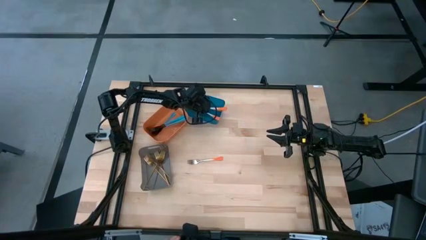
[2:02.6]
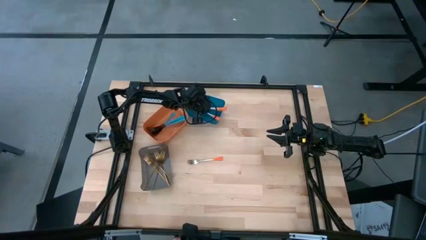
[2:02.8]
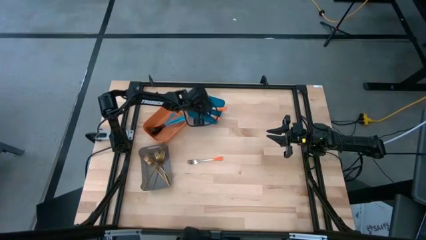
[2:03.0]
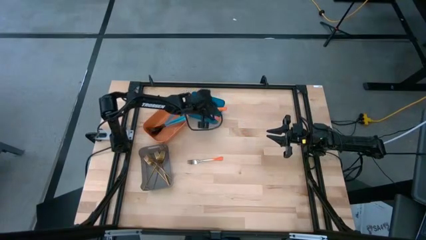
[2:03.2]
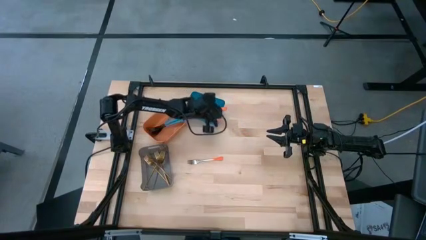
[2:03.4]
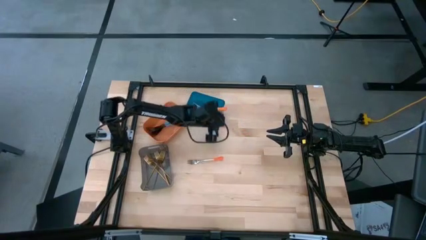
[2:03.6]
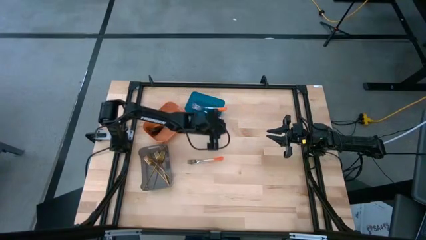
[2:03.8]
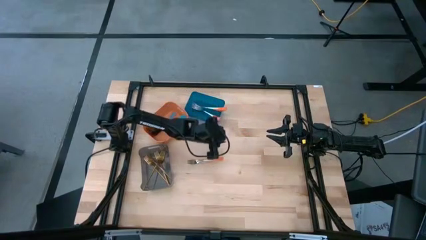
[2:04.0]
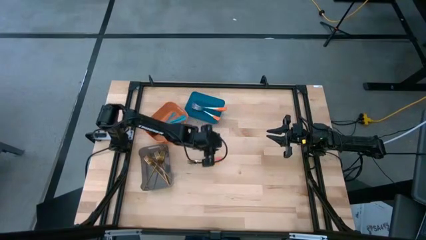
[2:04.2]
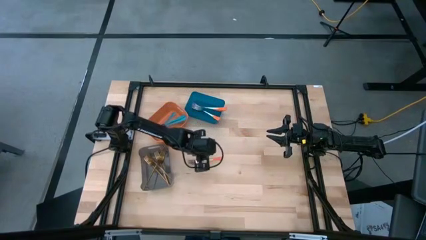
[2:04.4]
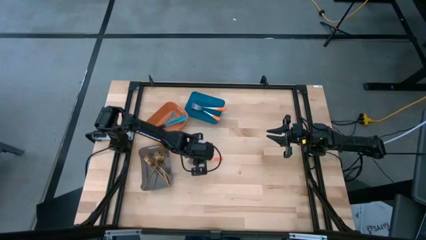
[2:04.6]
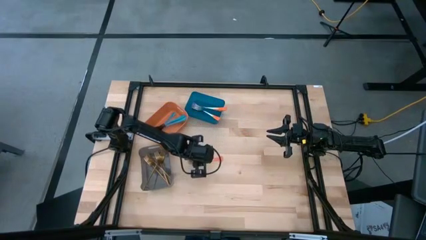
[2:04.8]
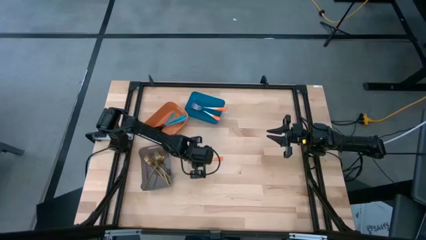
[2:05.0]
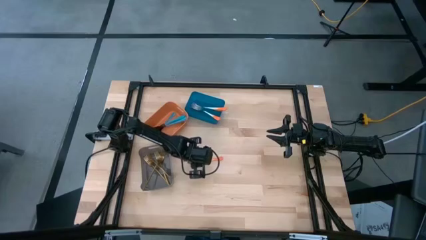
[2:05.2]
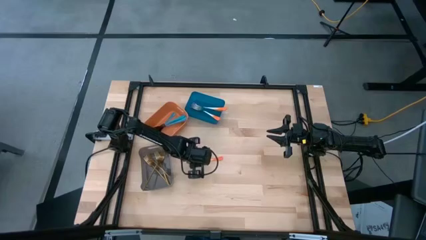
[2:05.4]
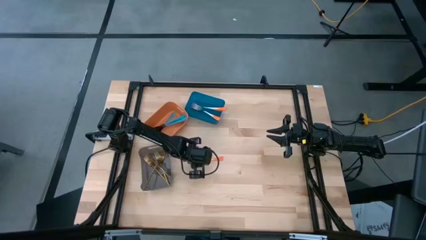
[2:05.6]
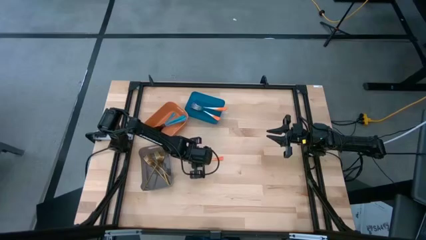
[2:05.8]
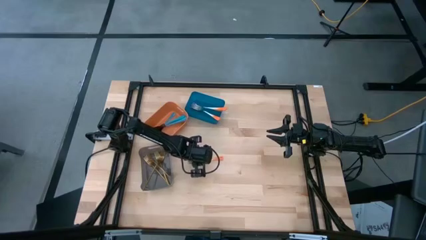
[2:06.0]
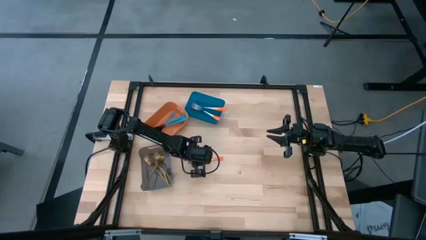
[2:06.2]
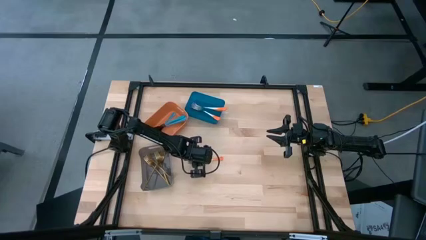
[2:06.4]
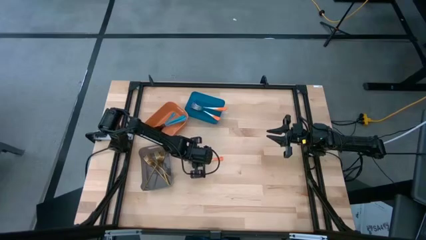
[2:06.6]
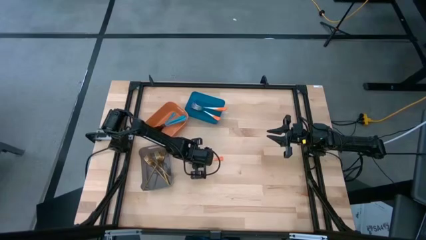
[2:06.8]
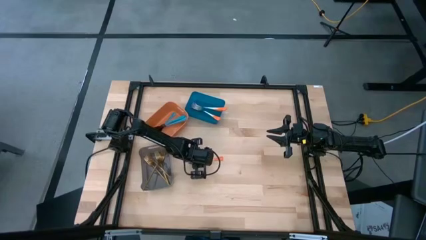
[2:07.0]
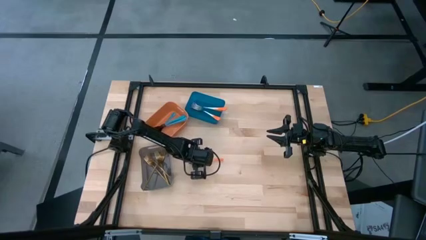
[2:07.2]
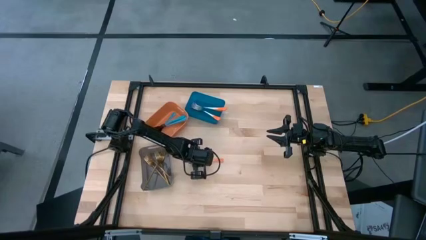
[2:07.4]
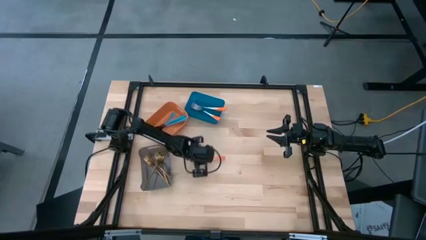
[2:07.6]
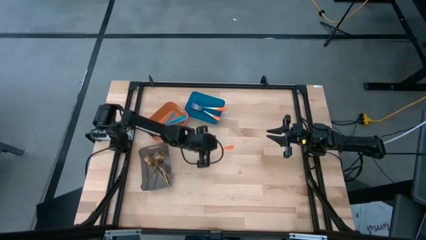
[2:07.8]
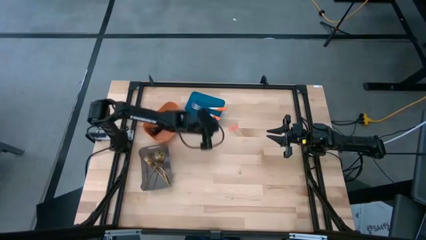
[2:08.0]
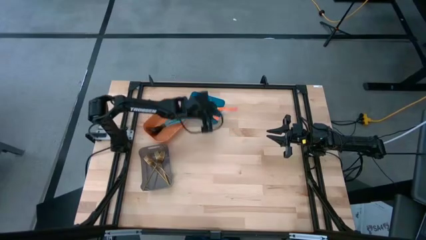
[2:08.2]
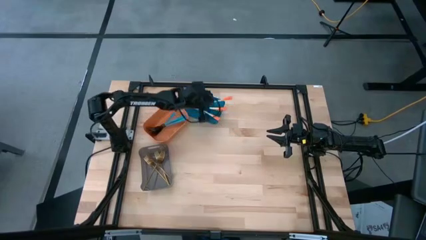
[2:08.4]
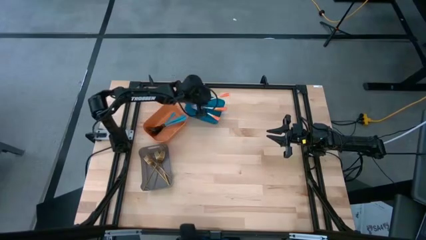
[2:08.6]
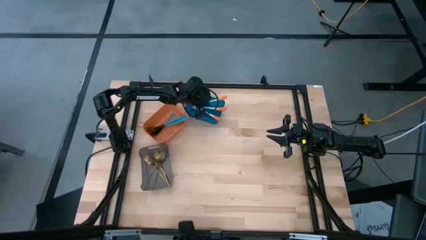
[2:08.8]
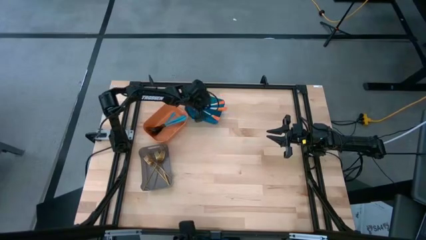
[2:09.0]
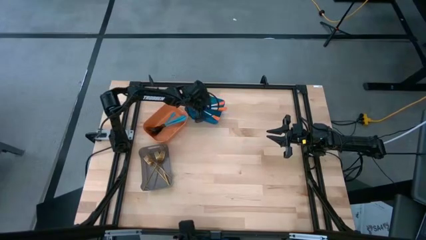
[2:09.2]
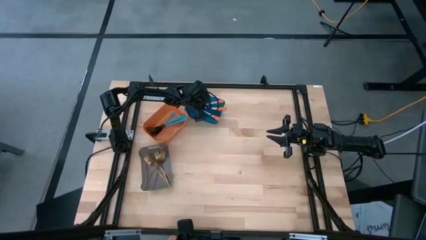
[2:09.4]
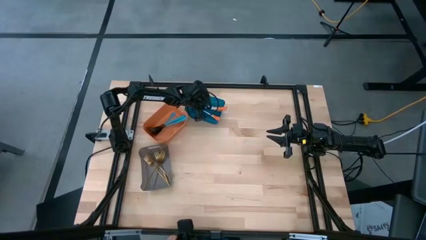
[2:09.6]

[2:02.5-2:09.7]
Task: Sort silverware by color (type)
Put the orange fork into the blue bin

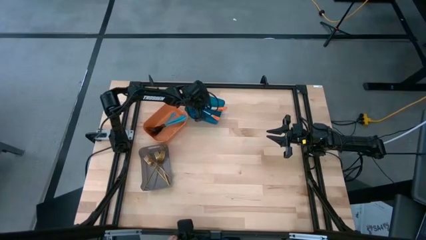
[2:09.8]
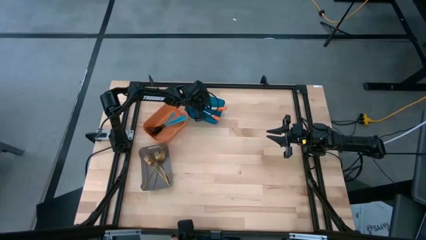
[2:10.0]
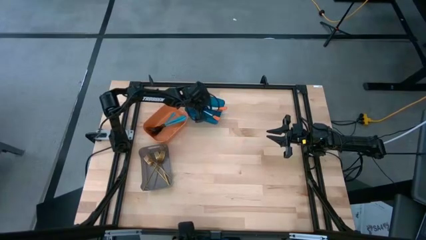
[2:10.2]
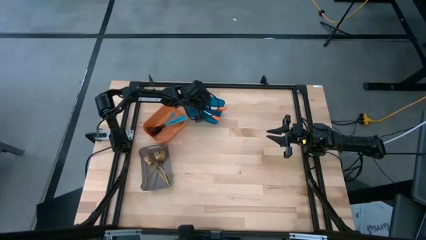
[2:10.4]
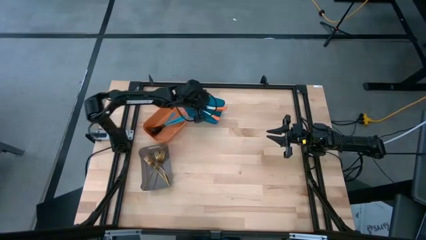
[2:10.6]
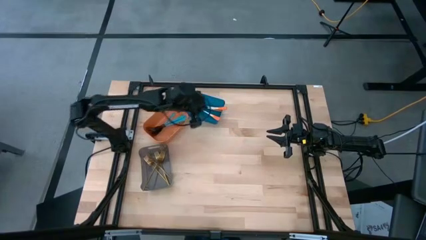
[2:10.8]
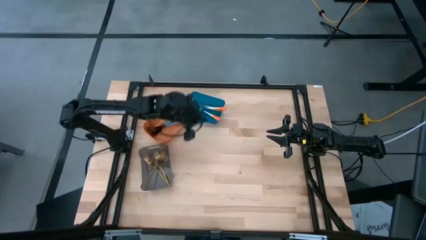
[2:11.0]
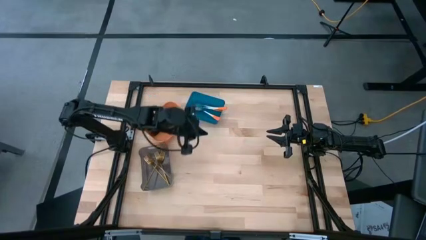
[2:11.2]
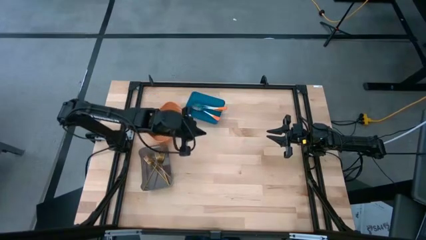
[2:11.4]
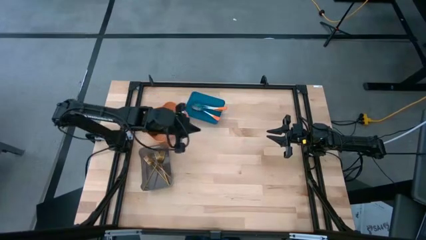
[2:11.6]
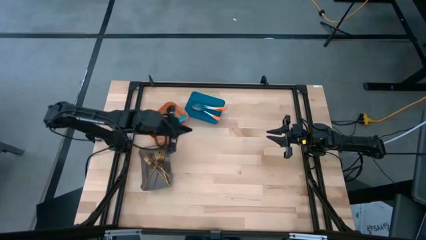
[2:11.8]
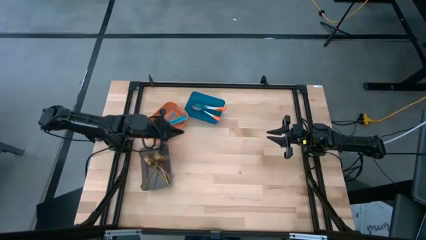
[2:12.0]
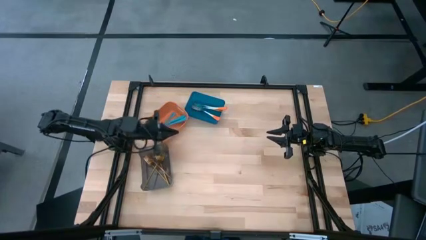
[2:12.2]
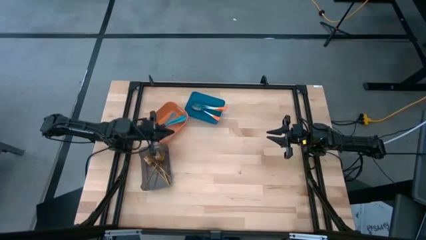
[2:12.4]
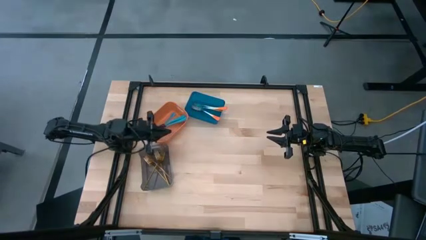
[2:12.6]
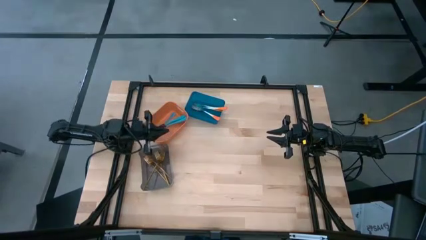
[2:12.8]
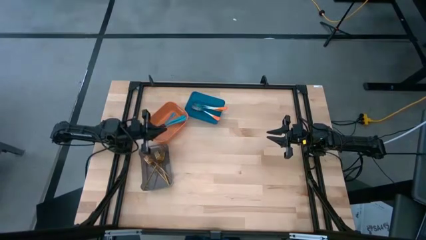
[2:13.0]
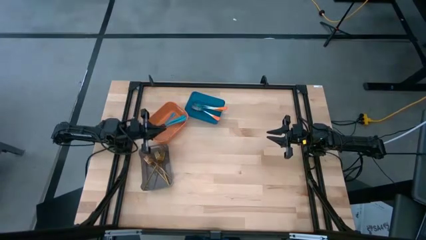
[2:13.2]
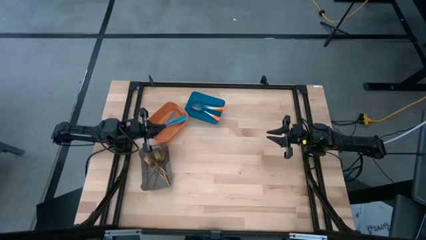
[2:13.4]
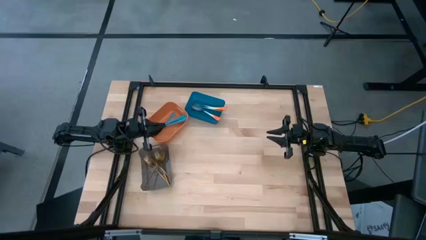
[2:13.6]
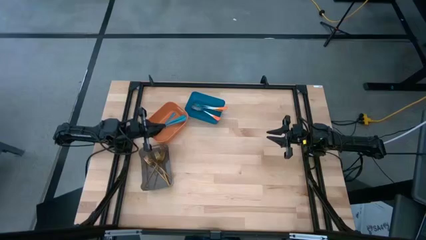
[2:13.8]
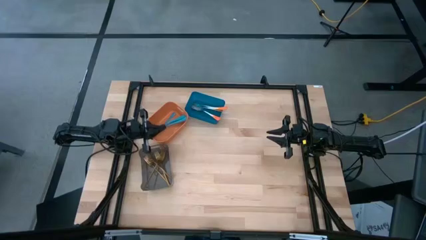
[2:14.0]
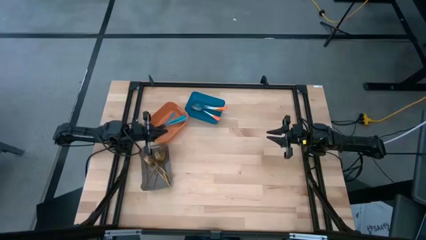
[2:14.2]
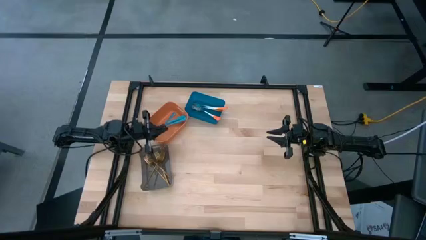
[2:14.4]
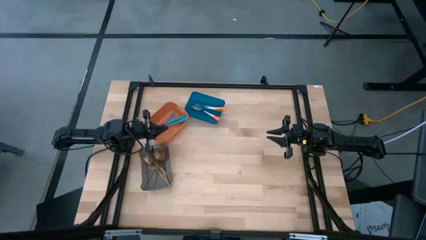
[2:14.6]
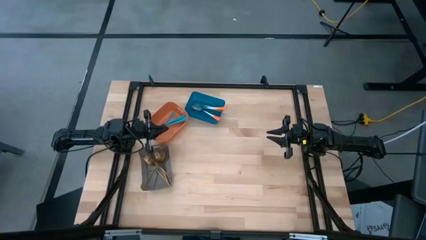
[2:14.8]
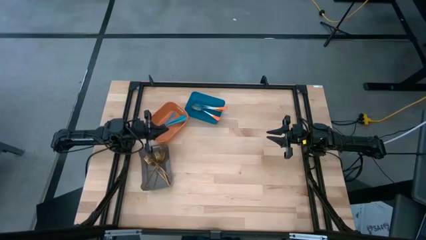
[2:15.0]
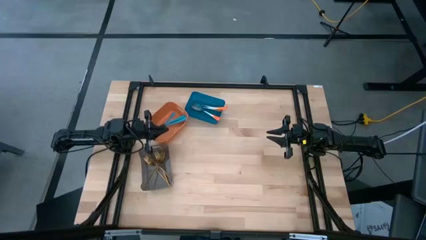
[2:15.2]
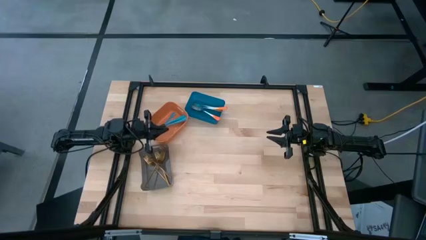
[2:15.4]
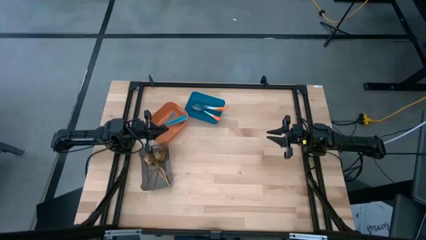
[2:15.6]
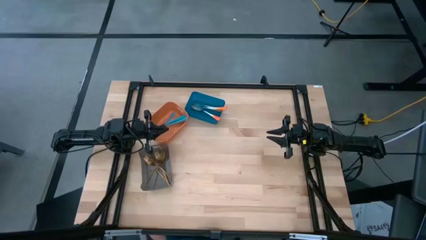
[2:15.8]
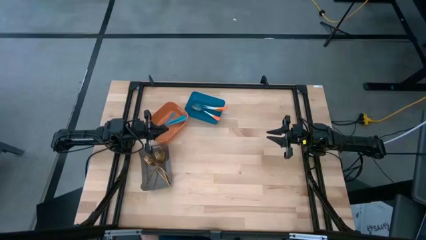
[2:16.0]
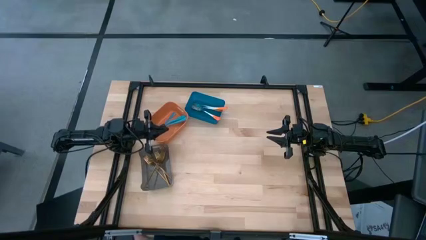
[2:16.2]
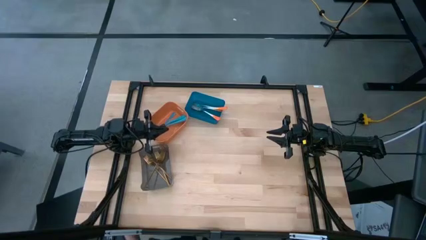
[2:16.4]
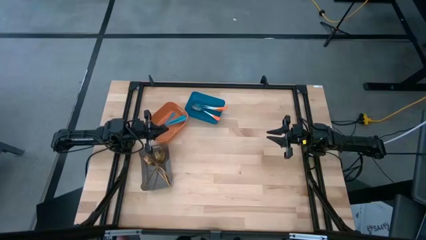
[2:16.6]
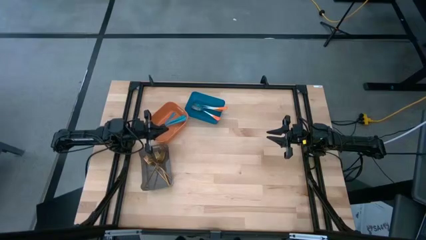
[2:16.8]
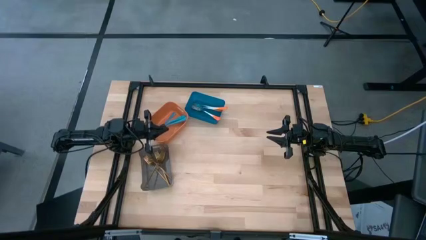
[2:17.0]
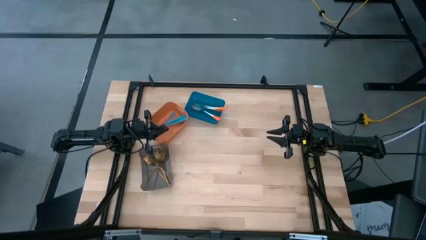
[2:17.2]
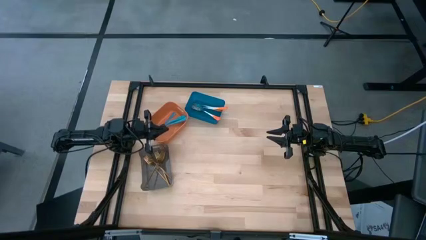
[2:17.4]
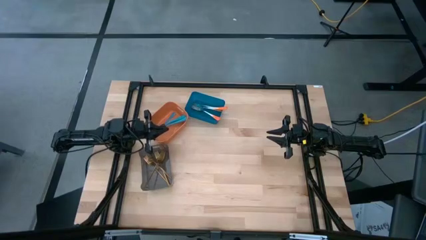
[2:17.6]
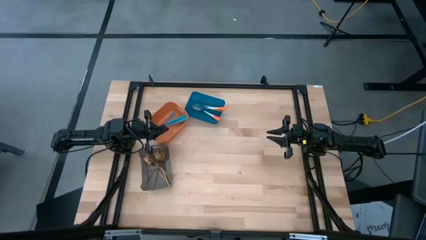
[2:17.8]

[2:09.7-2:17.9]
Return to Home Position
